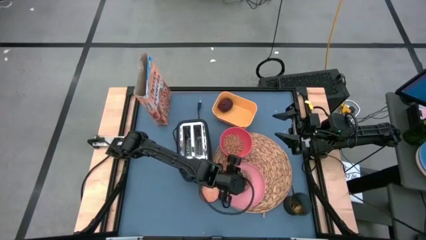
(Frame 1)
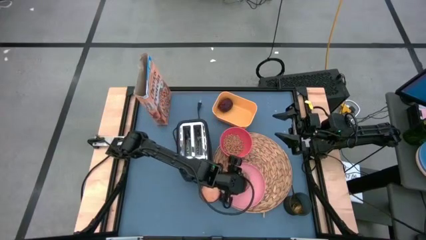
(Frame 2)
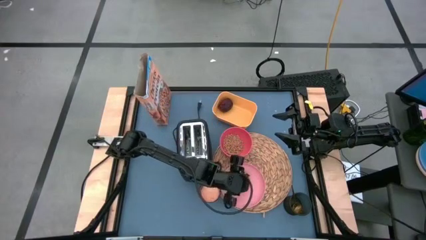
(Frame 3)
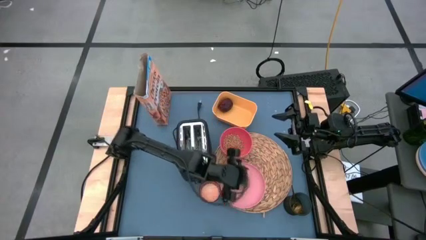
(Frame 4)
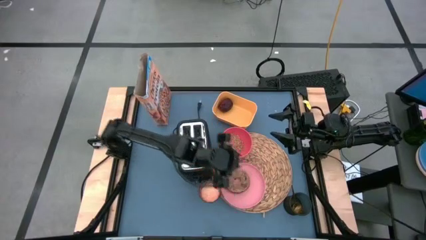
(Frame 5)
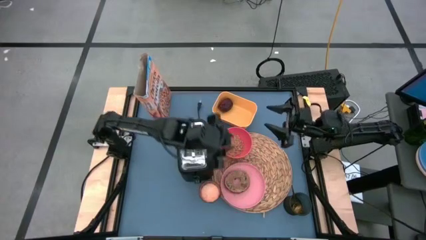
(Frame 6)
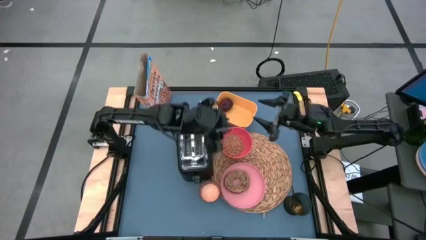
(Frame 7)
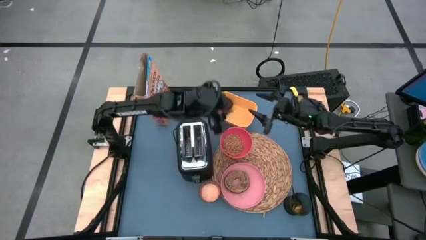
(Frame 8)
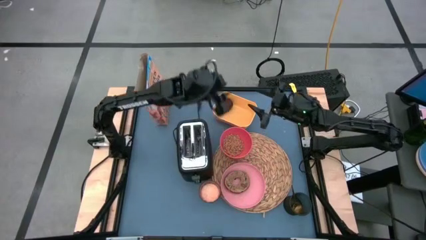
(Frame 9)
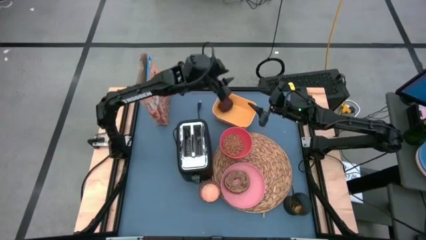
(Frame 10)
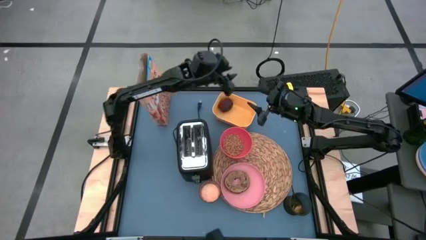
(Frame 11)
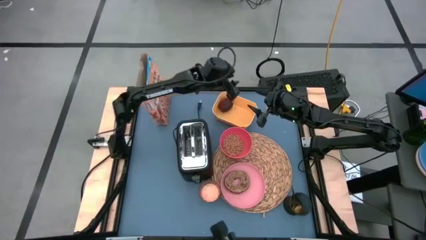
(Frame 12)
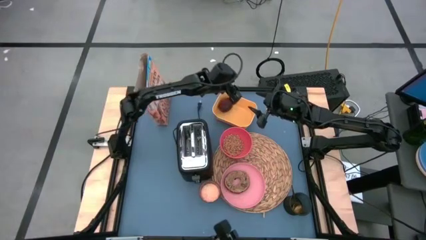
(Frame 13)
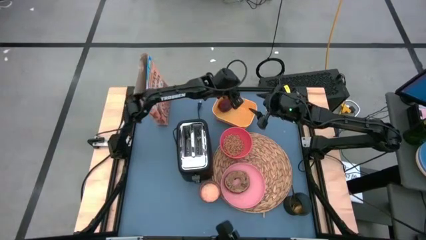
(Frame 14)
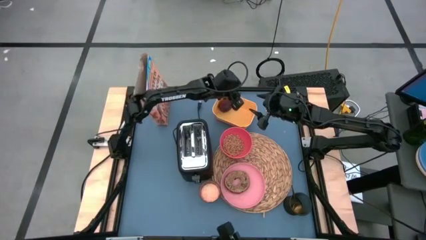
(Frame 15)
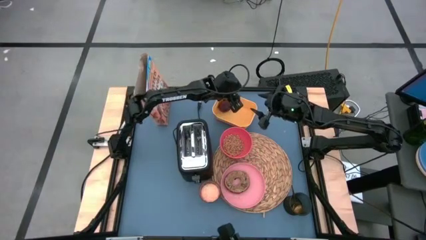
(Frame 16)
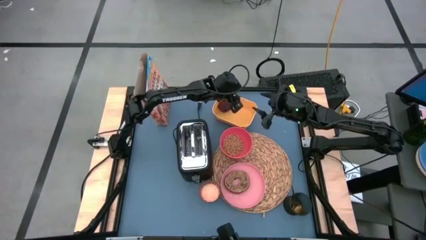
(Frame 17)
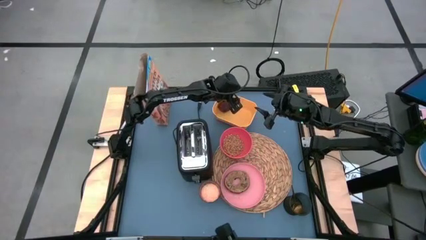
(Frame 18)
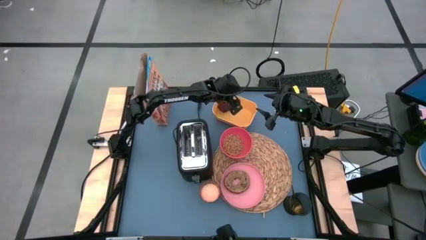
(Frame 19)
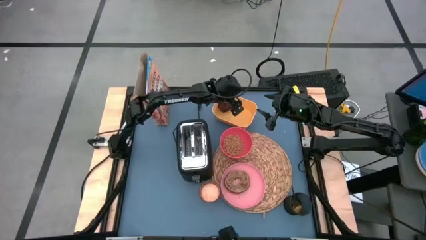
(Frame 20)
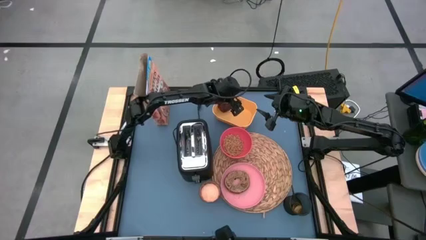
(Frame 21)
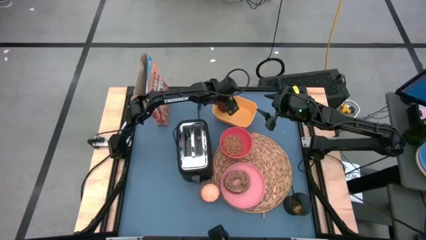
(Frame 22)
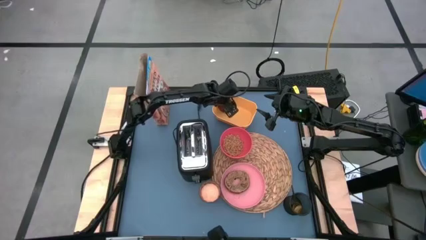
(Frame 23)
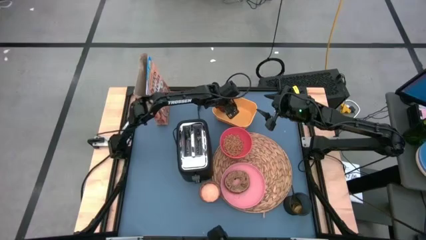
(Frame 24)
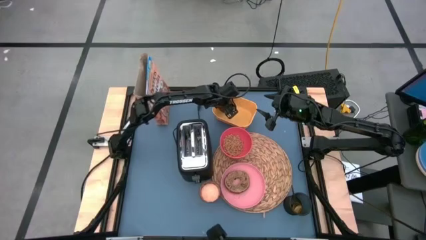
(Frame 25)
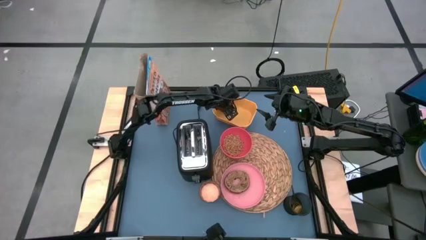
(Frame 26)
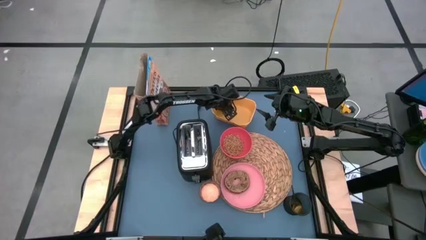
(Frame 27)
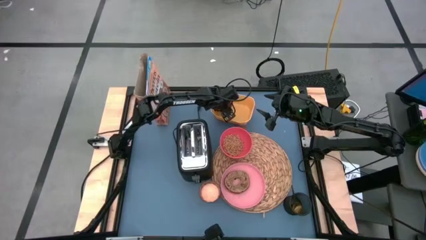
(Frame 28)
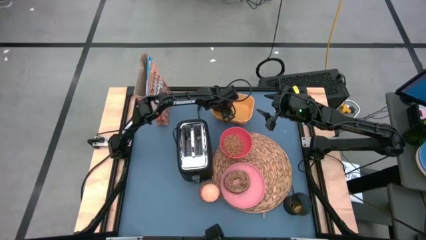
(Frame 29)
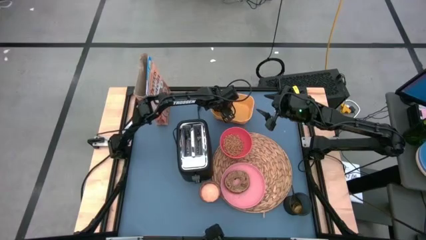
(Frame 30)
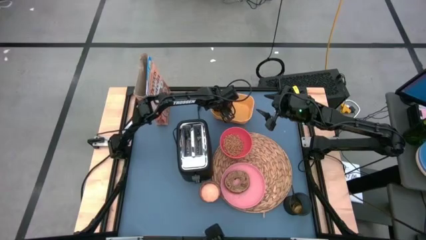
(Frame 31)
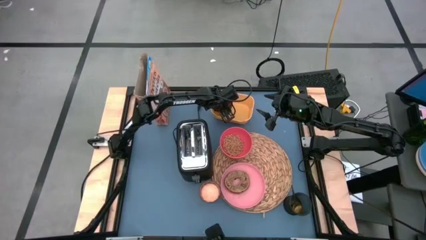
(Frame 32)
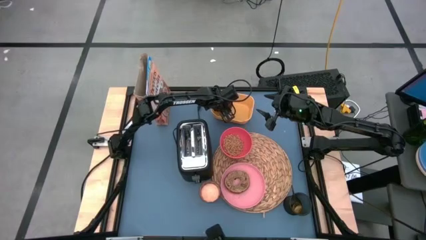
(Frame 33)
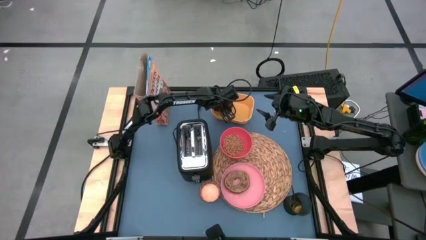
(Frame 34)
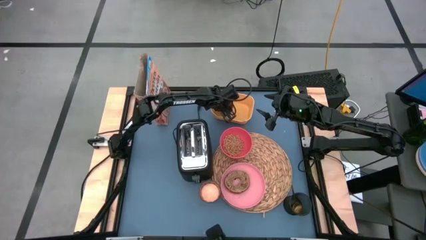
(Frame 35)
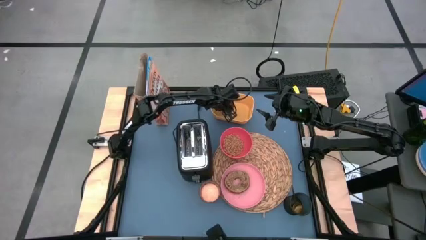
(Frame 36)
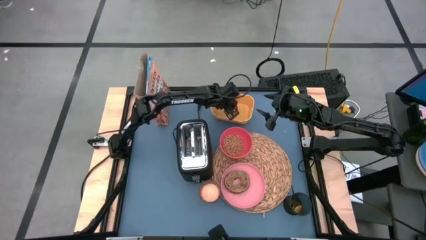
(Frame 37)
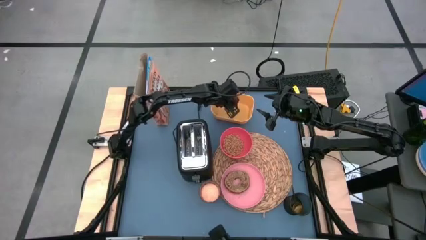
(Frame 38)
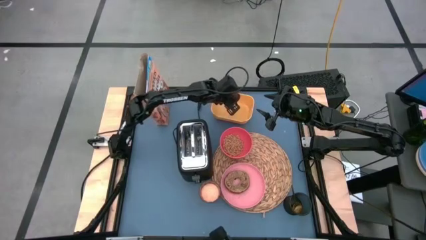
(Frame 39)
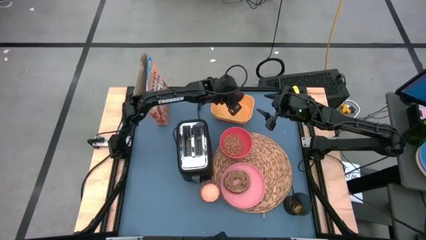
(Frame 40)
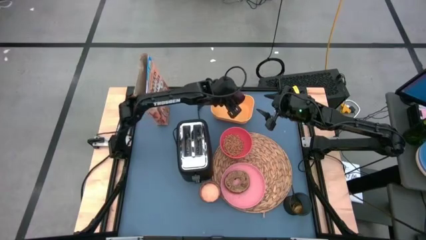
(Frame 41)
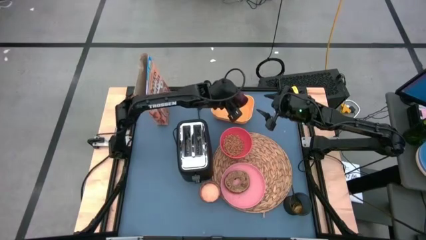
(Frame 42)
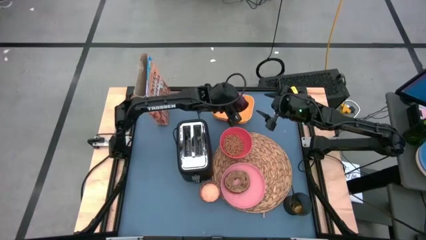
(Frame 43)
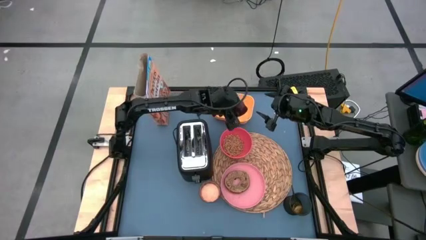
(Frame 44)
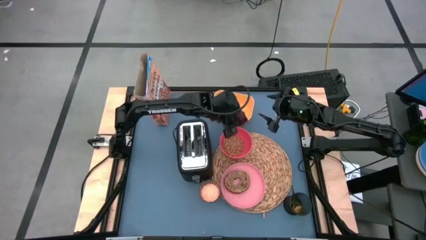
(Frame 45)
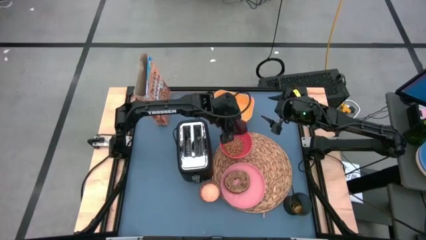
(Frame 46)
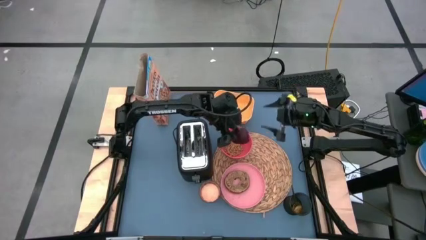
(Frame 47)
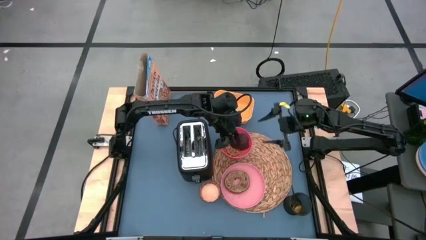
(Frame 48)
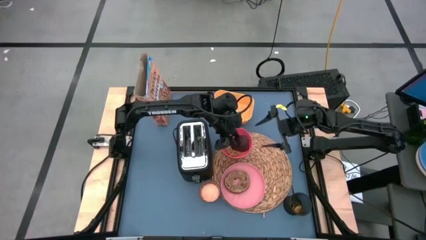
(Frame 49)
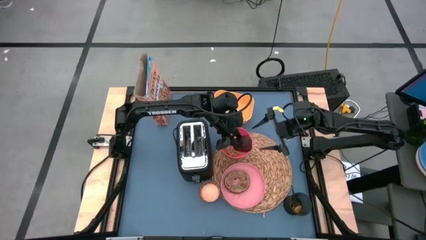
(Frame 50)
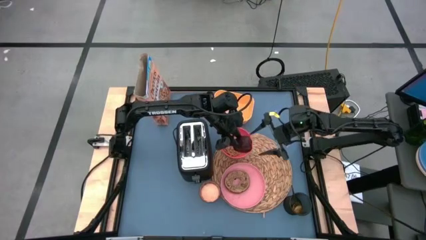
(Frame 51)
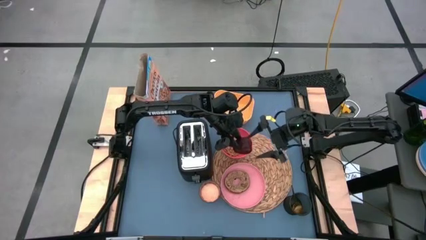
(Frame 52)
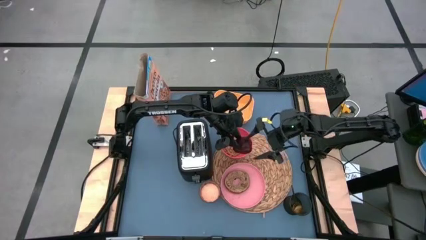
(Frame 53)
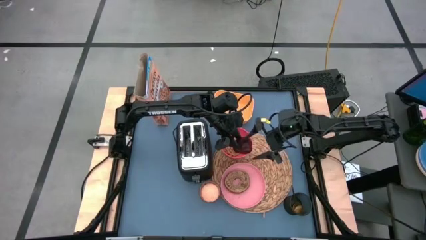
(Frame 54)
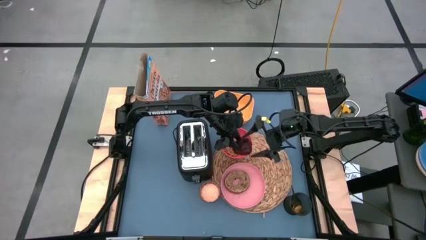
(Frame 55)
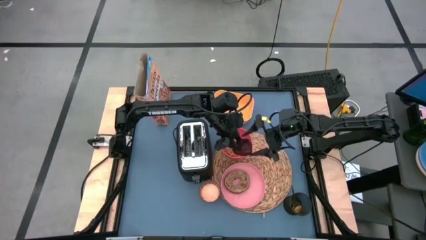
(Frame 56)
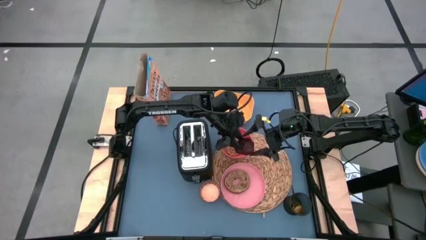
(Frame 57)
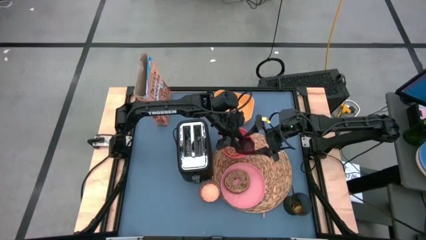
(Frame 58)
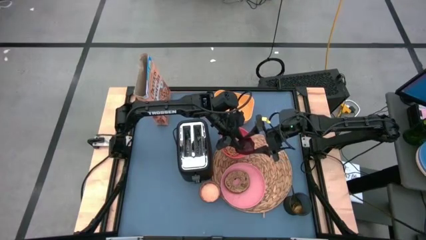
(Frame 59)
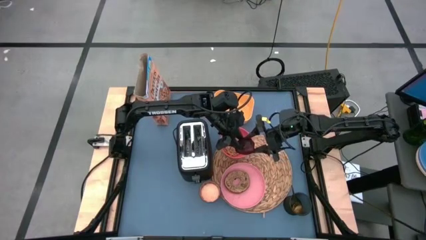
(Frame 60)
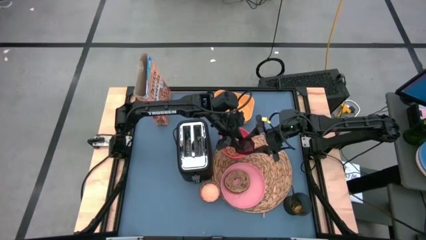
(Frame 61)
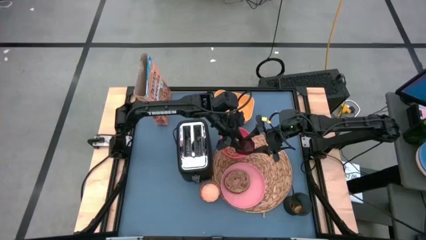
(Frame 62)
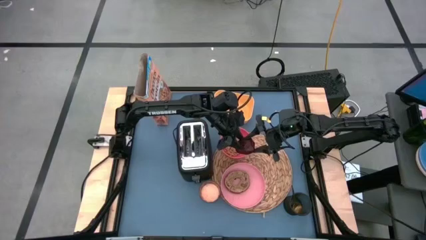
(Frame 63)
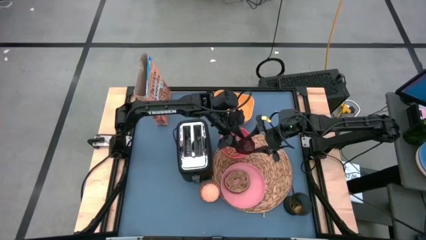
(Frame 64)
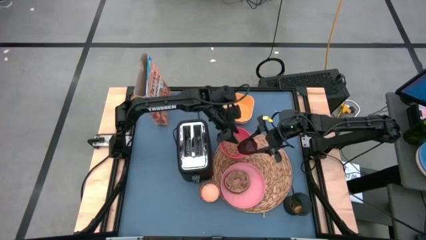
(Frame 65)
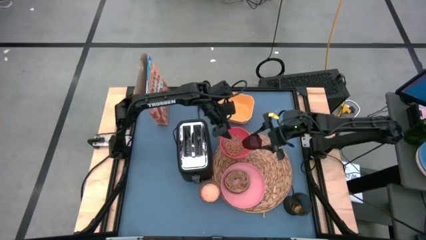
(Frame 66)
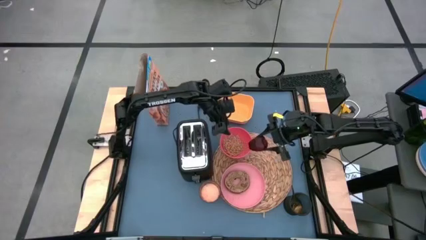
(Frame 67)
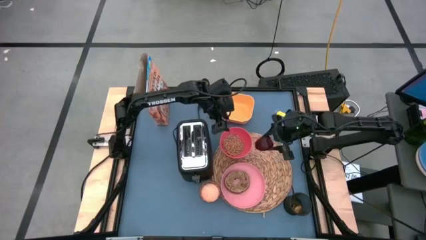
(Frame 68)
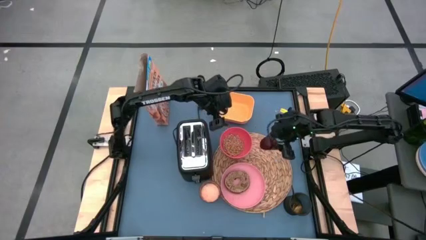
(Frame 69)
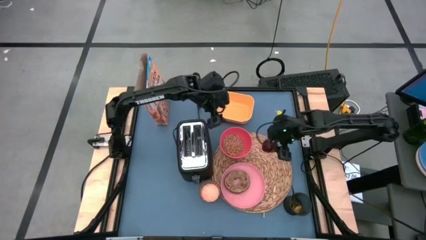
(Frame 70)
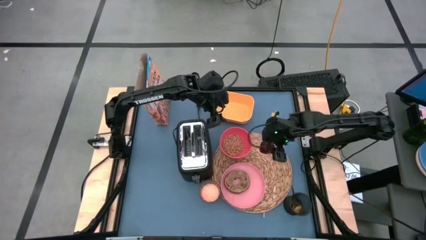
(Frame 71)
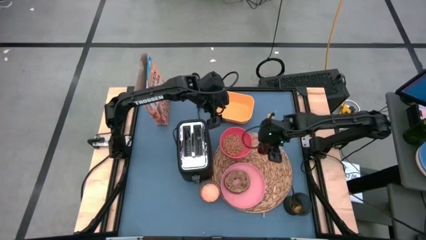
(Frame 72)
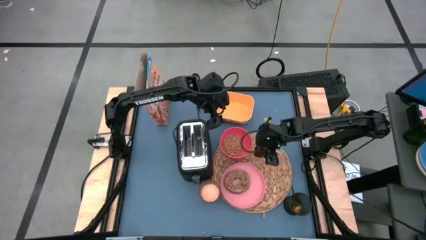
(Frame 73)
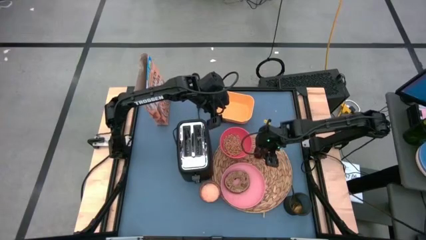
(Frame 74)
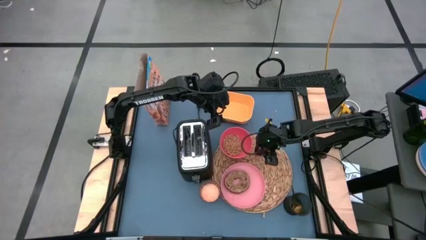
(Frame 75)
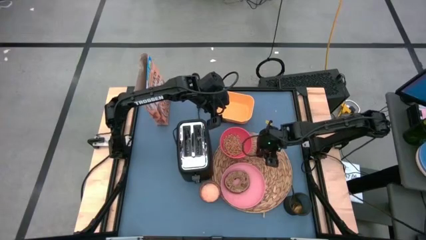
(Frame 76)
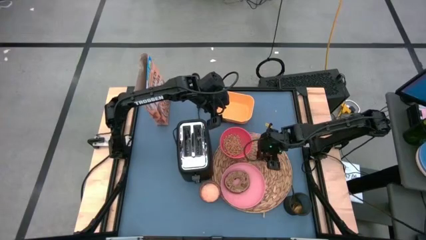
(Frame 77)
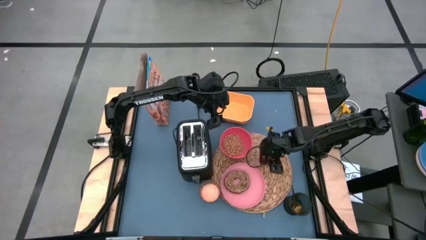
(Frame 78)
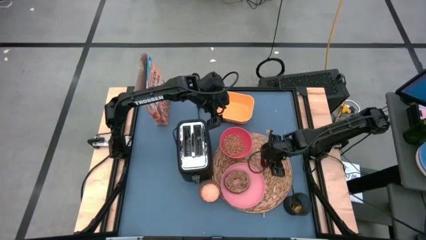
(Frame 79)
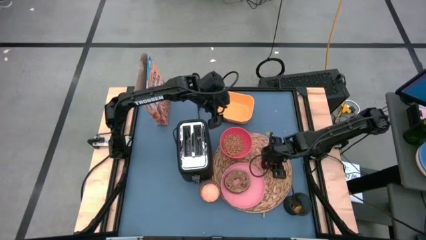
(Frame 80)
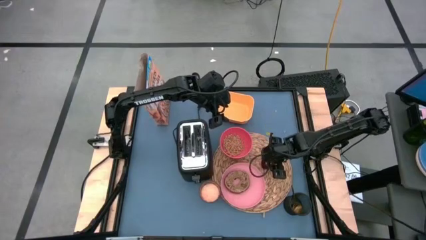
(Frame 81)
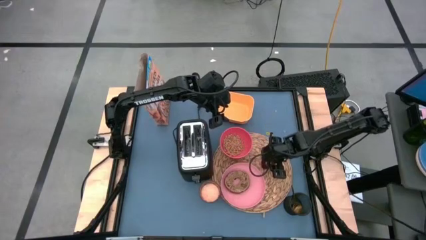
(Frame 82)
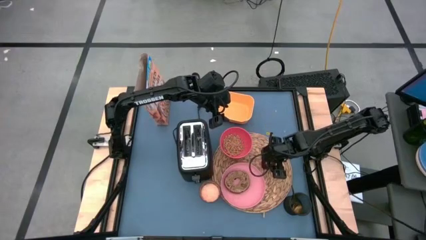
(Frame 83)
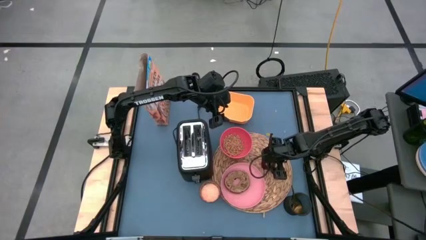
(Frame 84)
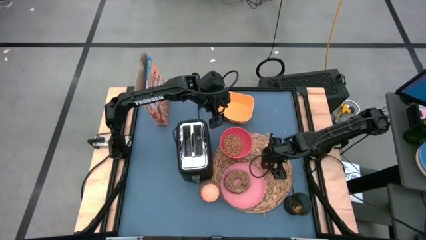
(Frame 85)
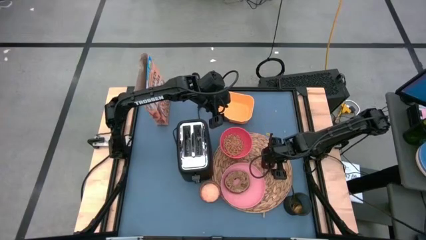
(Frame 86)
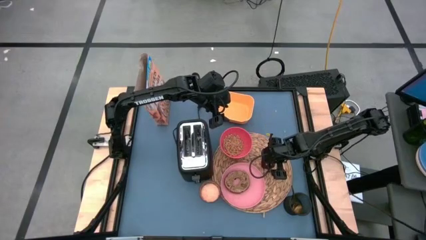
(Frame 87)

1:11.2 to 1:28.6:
Task: Arrange a breakfast setting
Put the apple on the table mat
